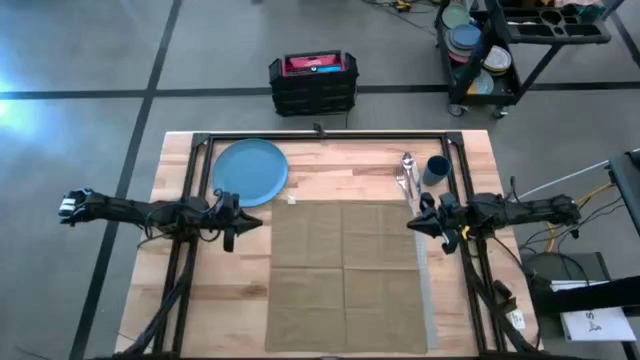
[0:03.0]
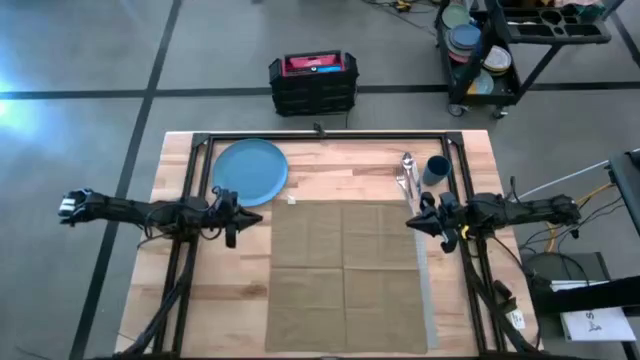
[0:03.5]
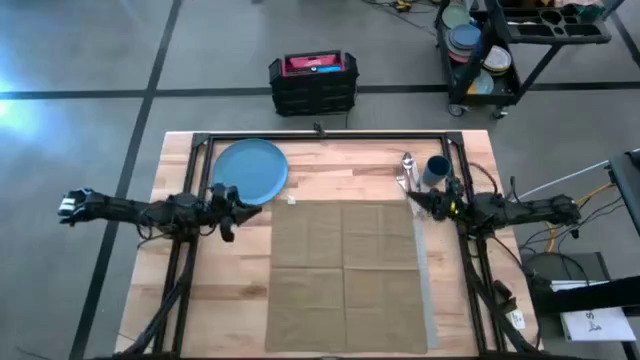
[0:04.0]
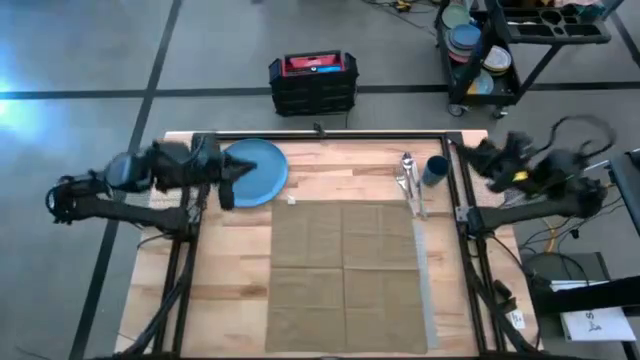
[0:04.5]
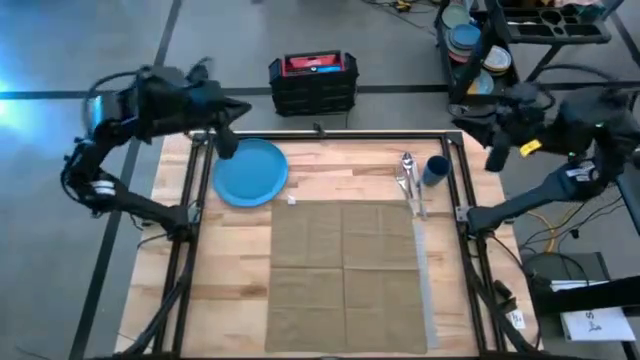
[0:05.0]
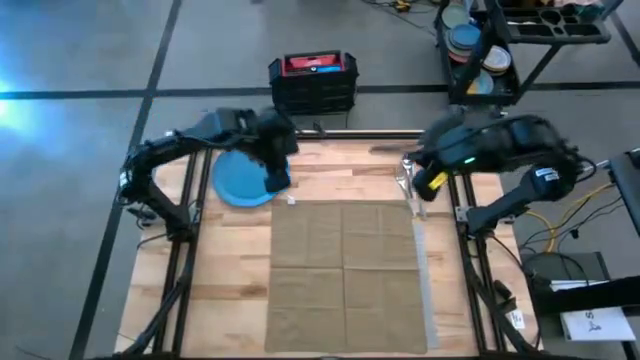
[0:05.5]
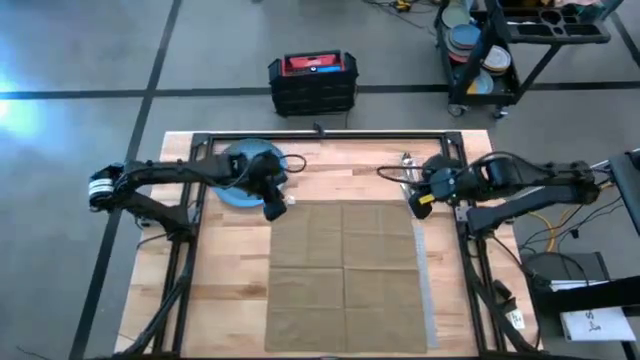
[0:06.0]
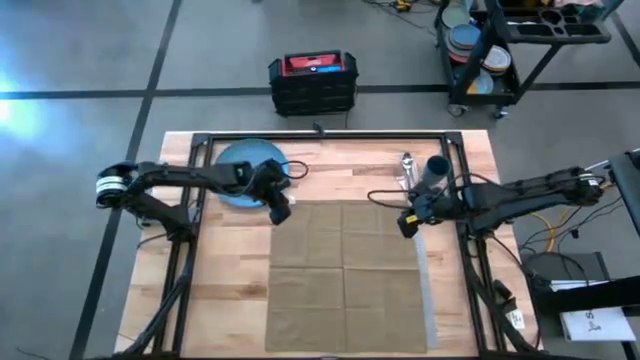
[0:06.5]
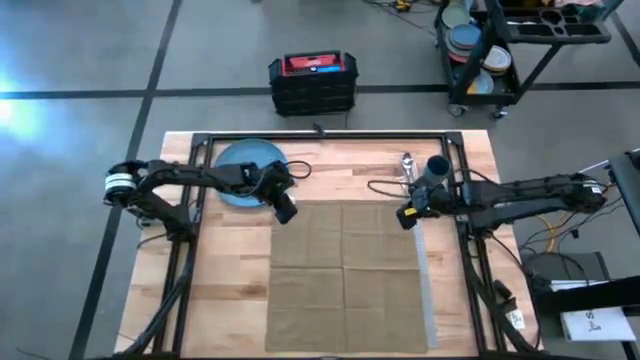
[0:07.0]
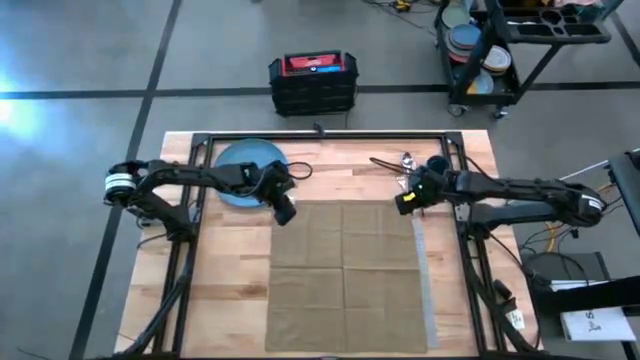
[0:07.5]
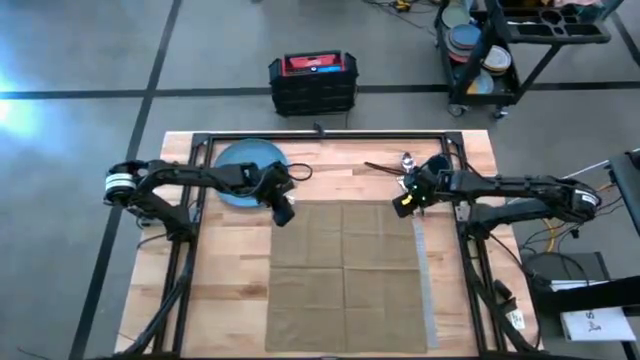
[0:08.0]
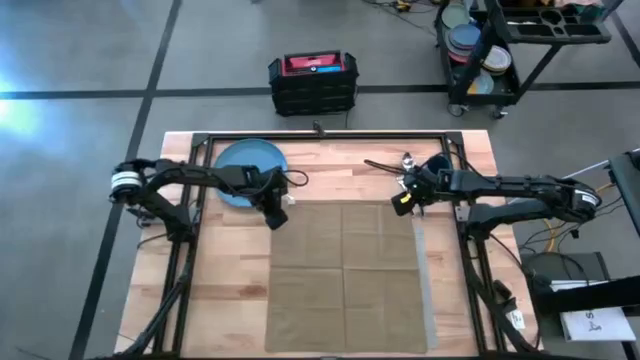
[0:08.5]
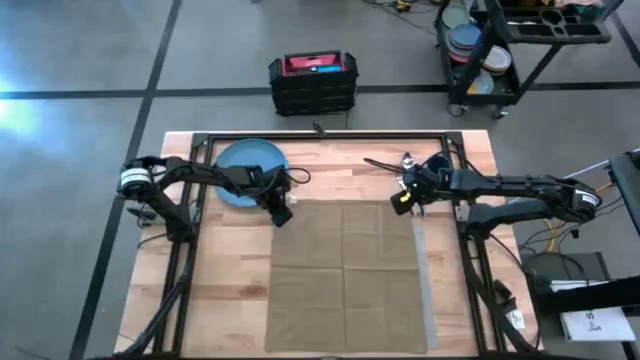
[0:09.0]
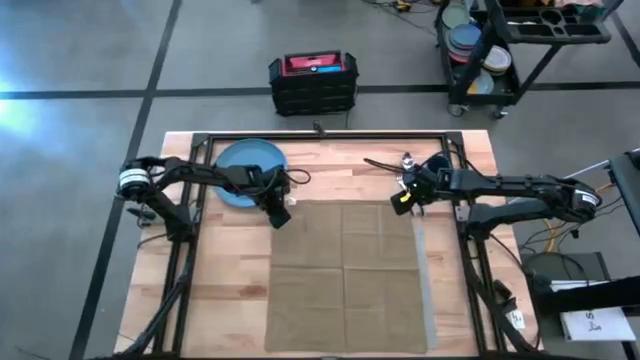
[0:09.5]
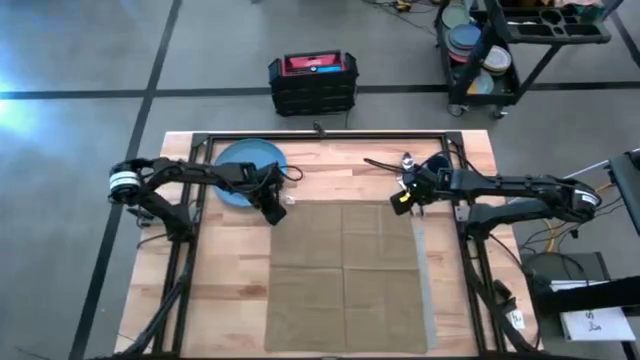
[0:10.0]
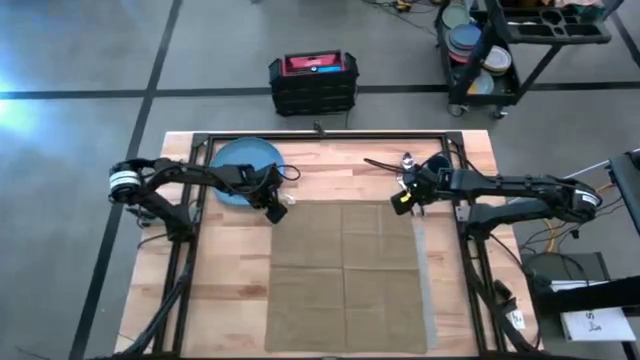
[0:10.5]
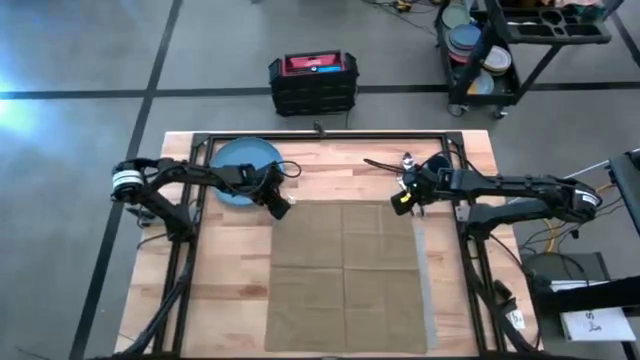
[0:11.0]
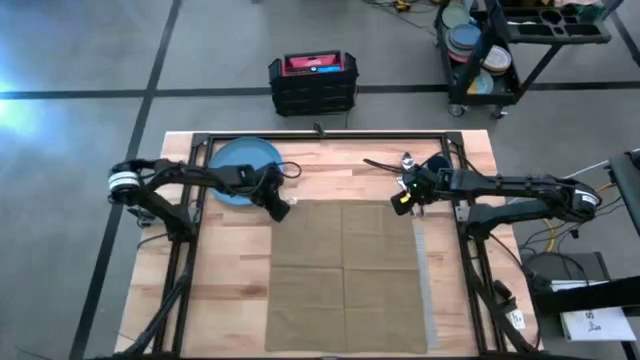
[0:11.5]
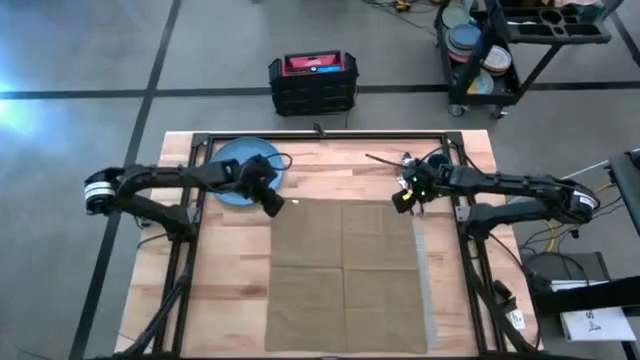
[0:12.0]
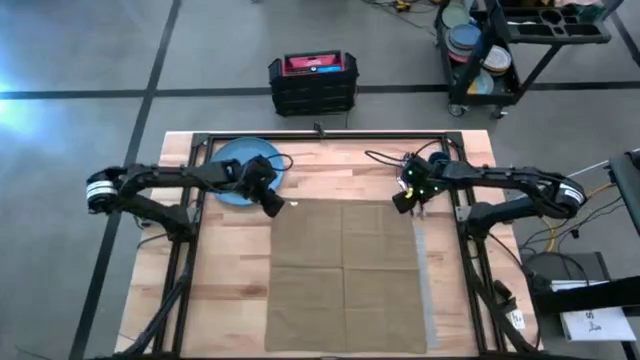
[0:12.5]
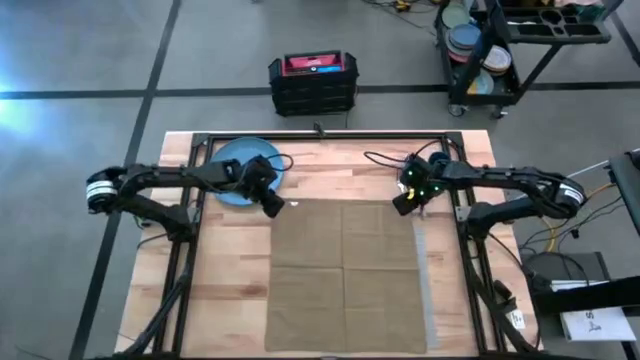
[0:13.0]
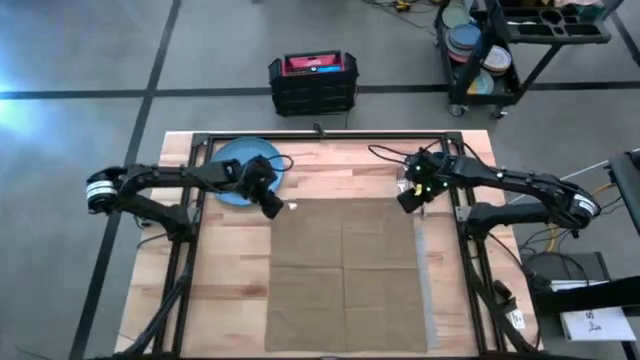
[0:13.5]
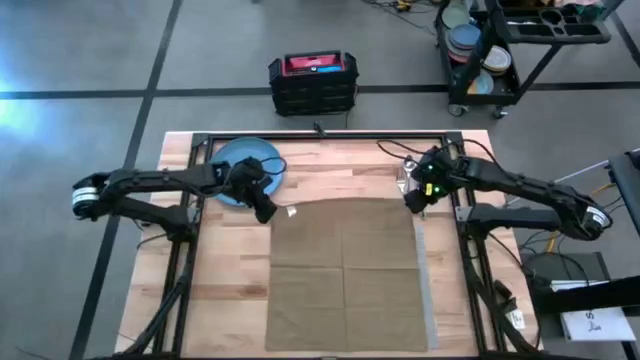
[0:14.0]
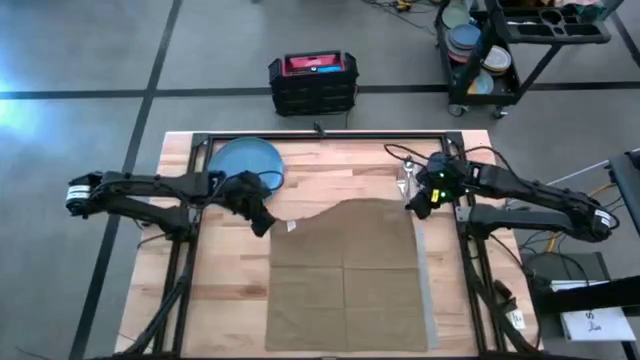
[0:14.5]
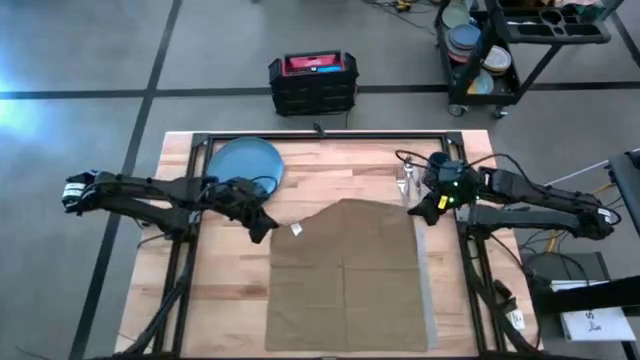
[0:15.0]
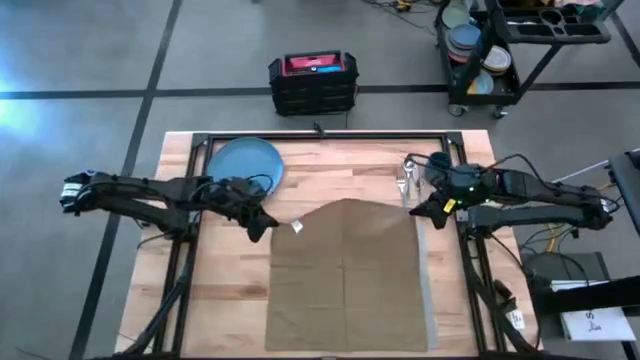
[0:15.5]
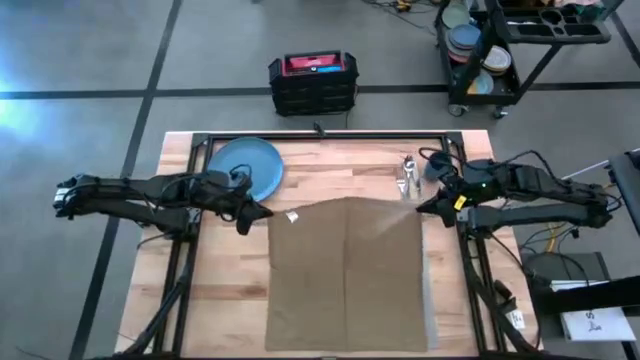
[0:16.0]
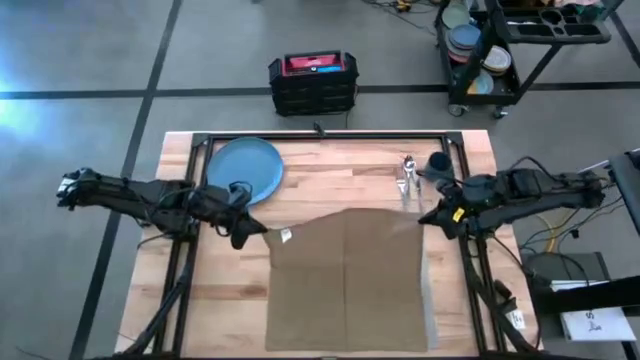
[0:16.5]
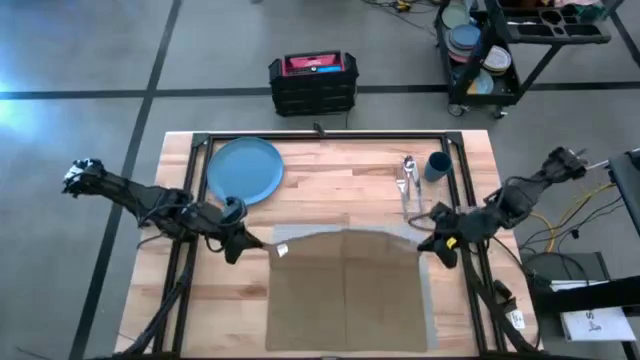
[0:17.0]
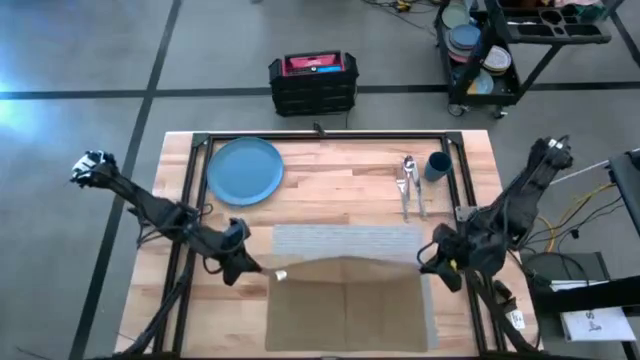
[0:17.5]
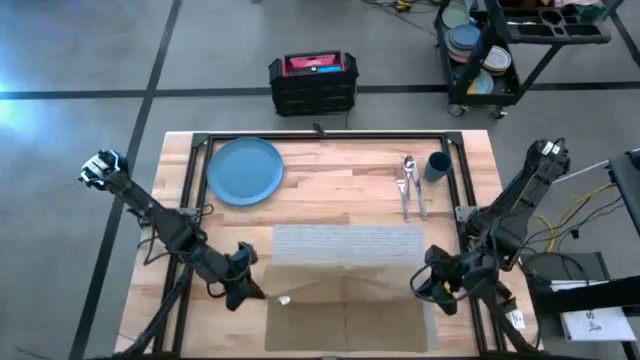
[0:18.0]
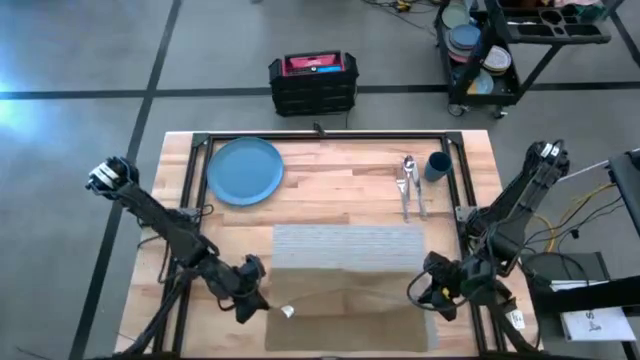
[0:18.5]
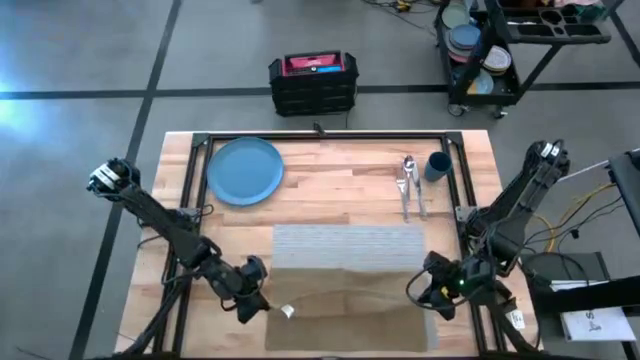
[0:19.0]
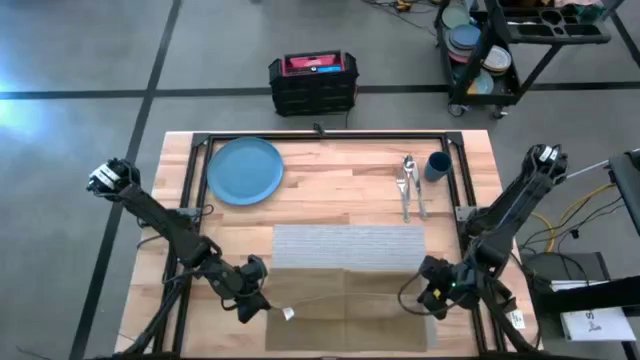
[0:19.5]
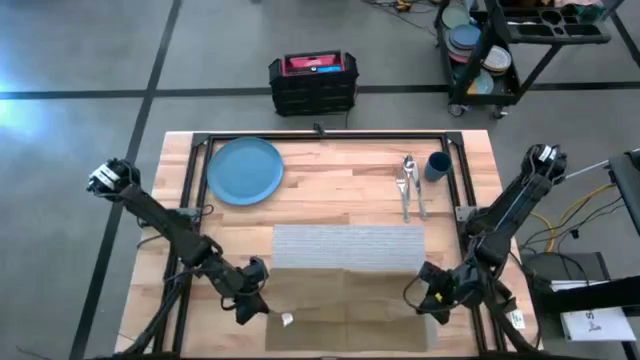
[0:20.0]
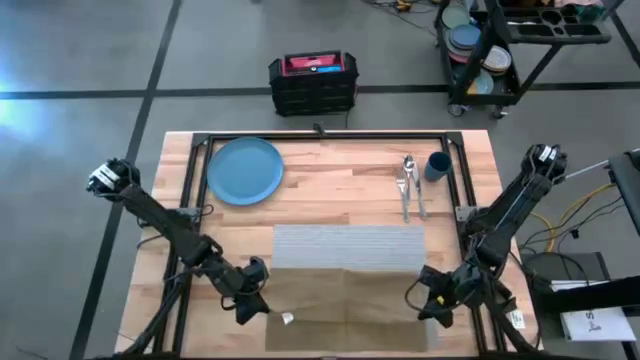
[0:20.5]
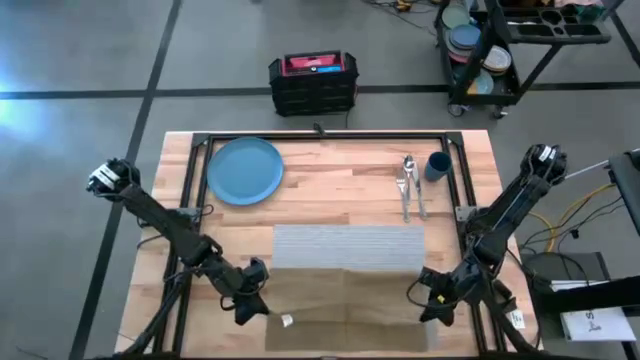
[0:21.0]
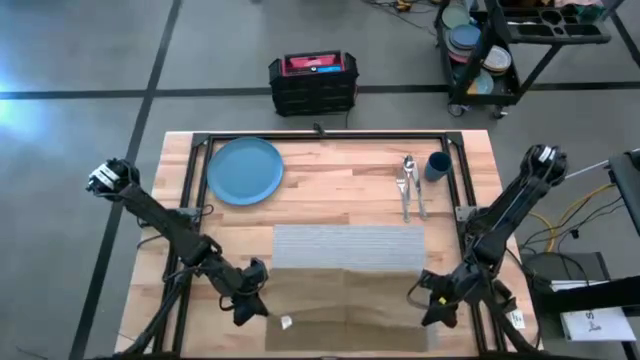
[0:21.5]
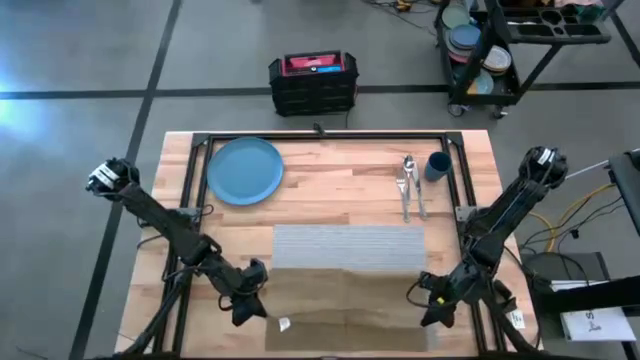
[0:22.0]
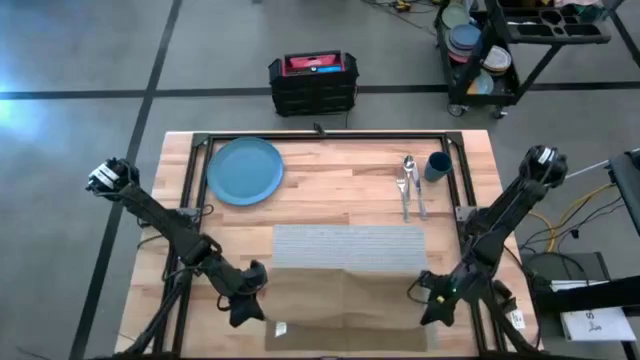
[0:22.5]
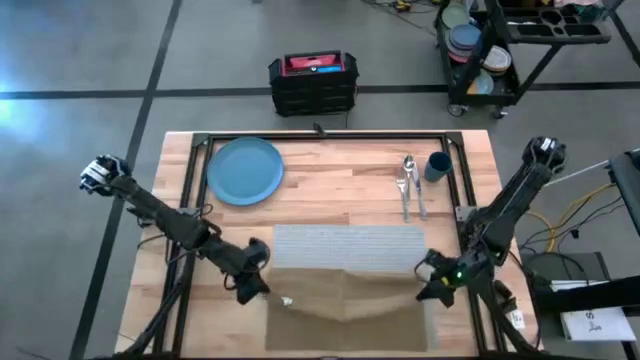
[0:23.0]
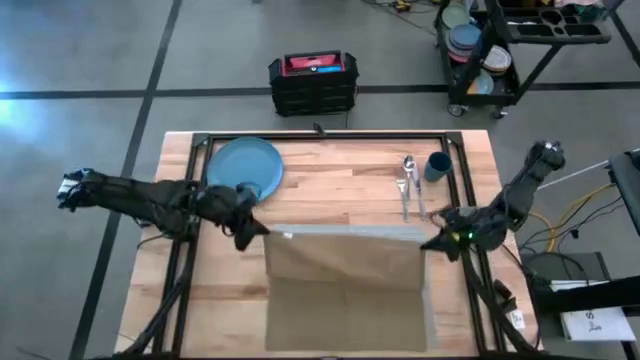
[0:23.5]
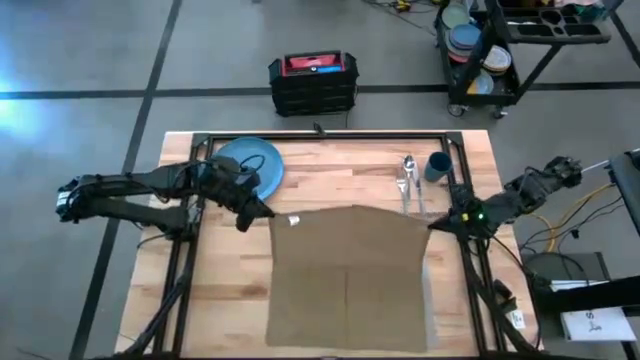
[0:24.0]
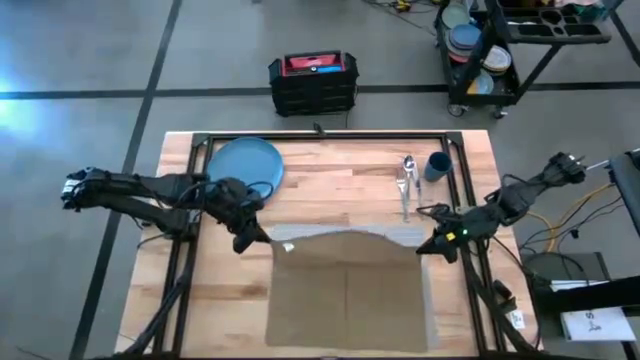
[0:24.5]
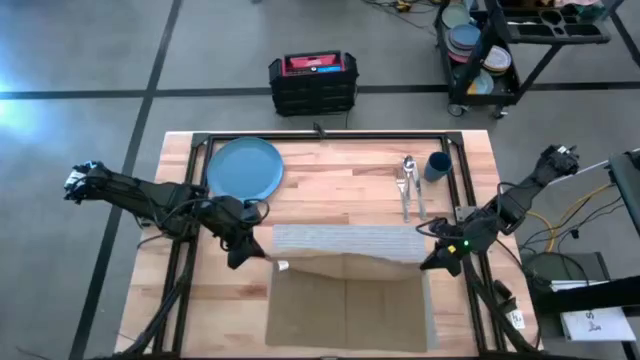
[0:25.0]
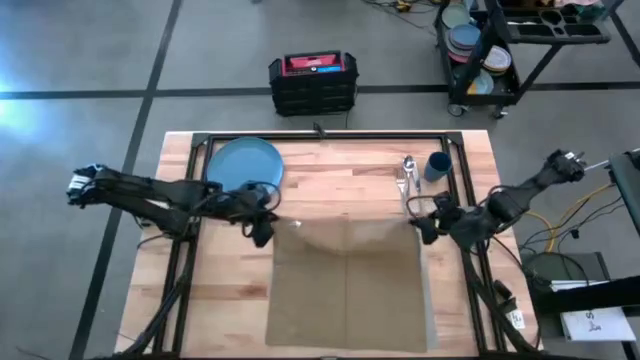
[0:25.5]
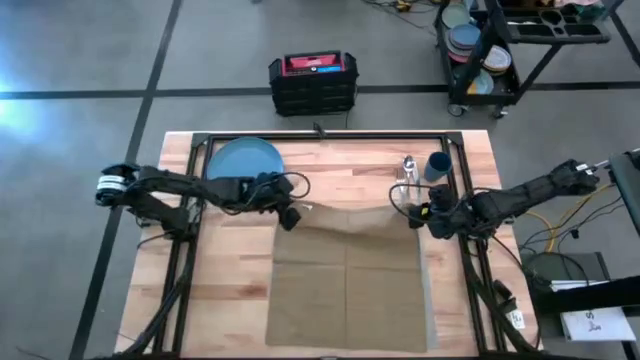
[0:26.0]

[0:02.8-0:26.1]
Task: Set table place
Fold the brown table napkin
